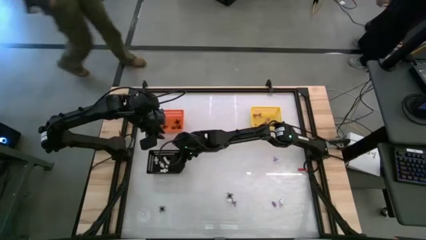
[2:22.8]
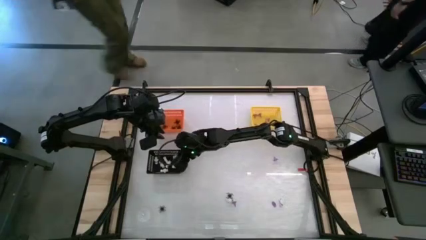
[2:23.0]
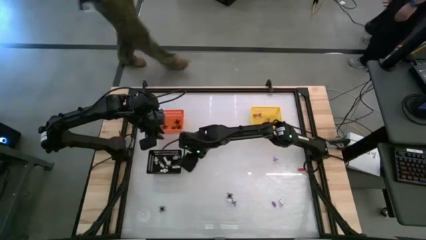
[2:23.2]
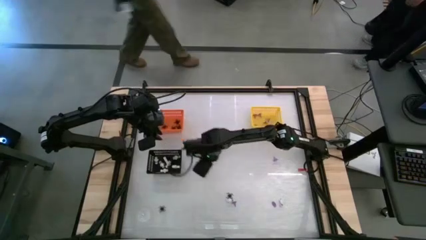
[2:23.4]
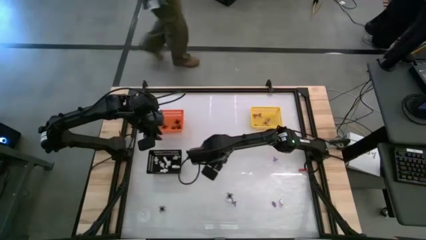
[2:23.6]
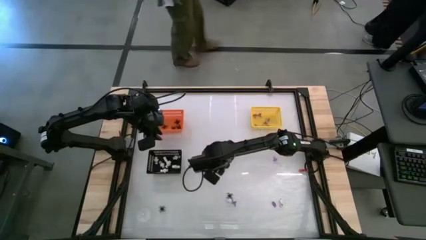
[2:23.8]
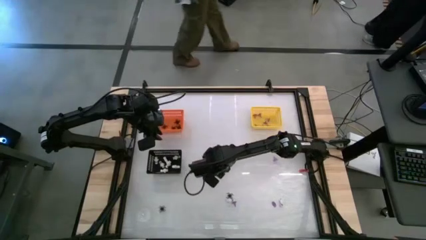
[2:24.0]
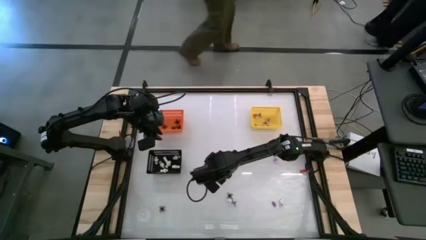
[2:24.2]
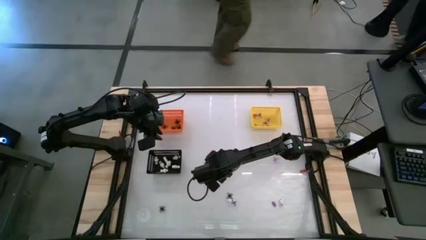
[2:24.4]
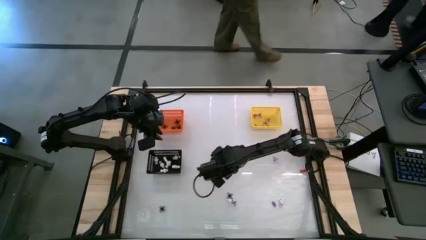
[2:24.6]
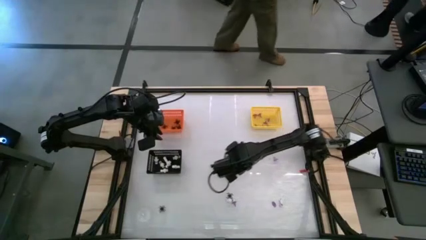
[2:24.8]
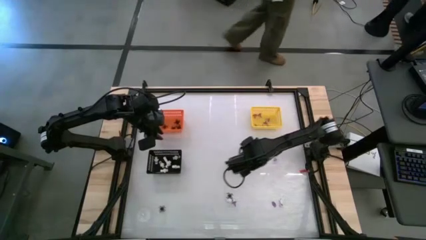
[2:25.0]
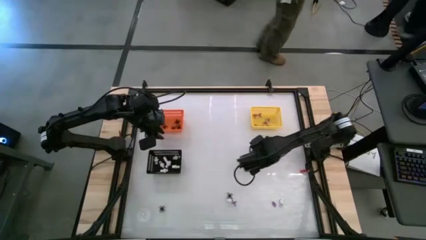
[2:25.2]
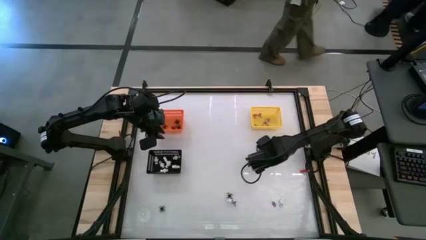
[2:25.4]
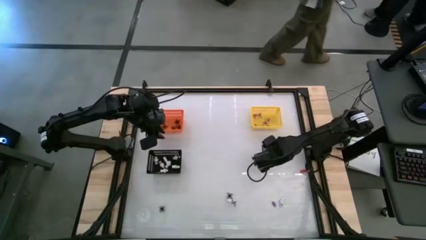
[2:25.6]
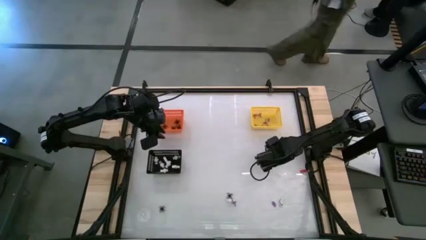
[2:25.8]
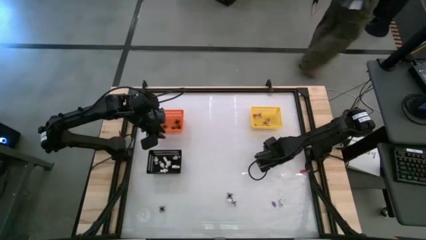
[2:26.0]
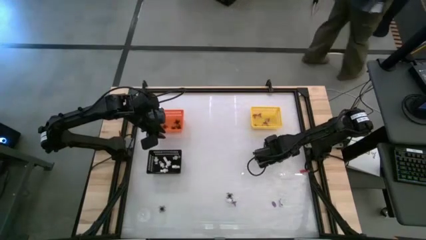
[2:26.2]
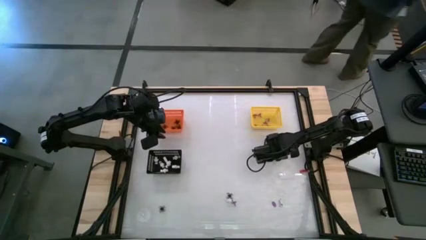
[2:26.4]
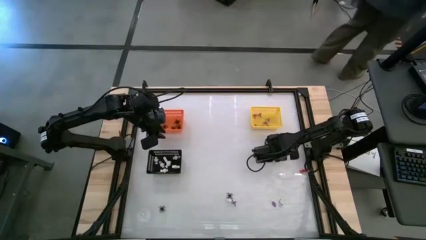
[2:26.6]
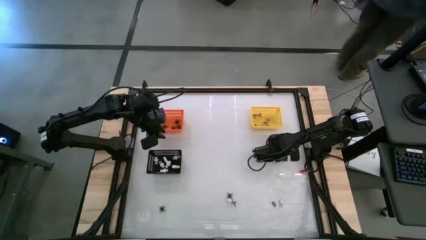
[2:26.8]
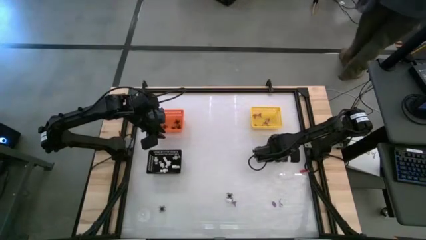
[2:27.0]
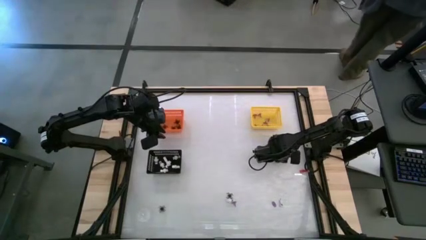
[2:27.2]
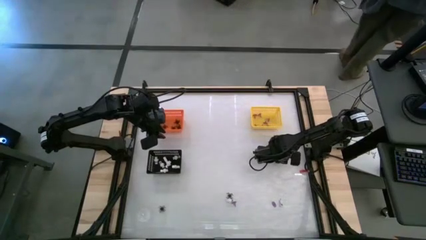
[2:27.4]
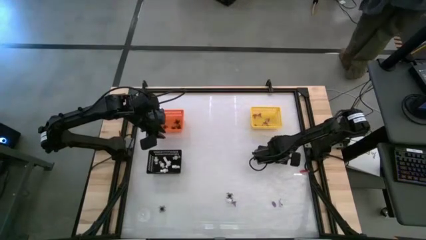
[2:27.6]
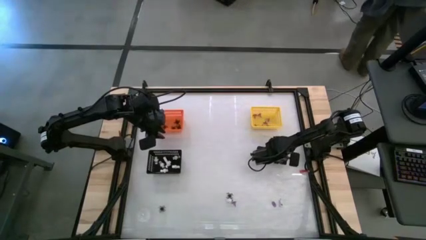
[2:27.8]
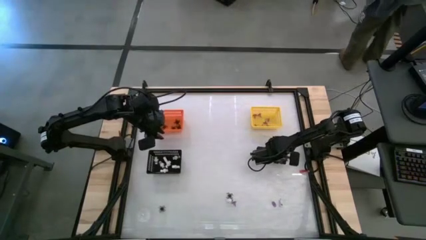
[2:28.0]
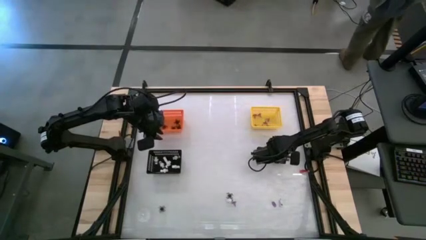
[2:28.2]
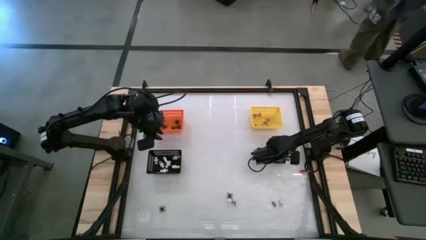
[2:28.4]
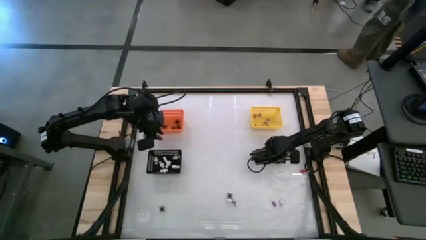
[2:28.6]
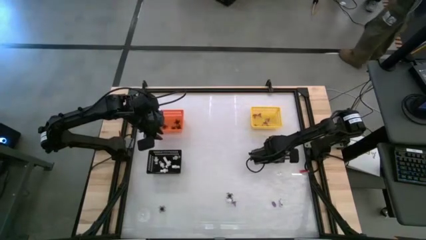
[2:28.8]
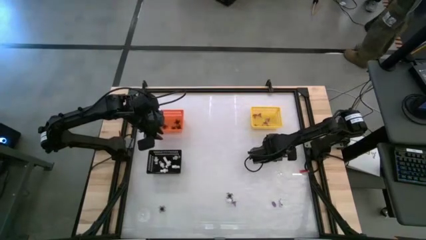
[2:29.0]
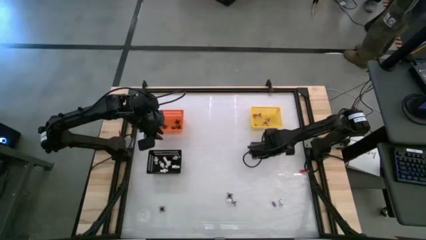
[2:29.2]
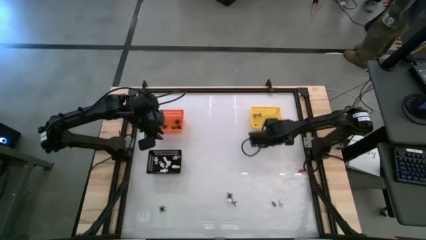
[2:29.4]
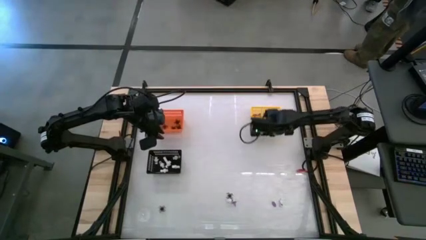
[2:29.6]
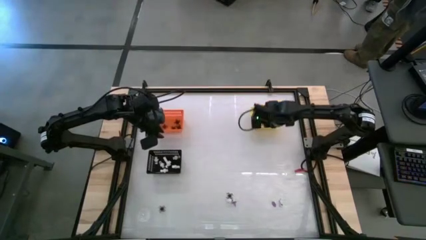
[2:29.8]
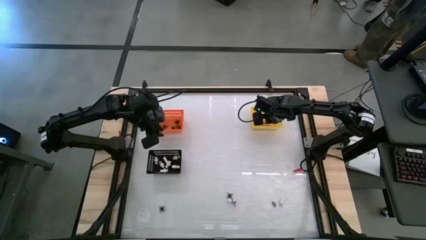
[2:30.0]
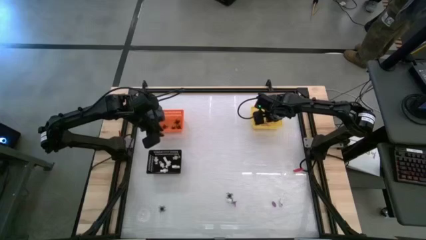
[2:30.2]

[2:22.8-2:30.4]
Task: Sort Halloween decoration
Put the violet witch hat into the yellow bin

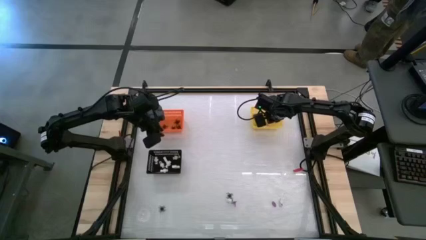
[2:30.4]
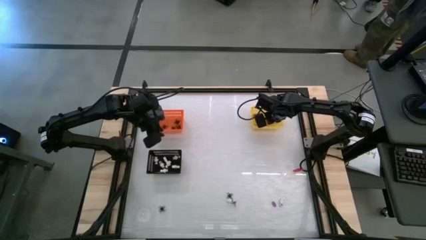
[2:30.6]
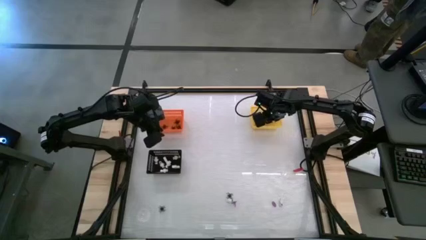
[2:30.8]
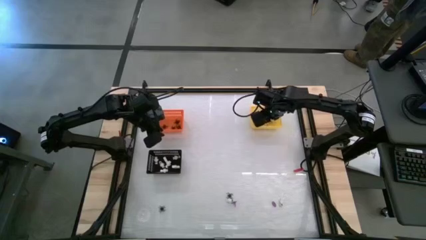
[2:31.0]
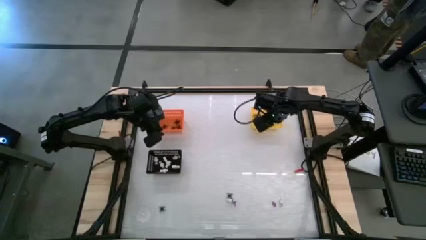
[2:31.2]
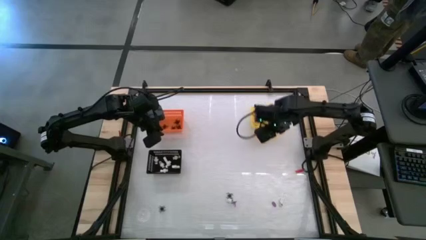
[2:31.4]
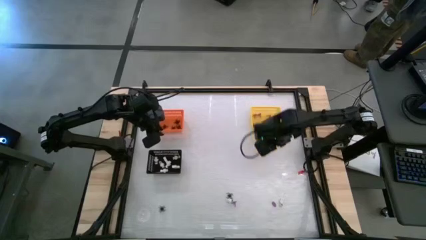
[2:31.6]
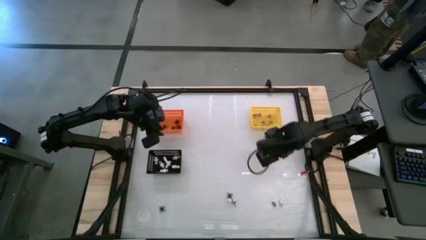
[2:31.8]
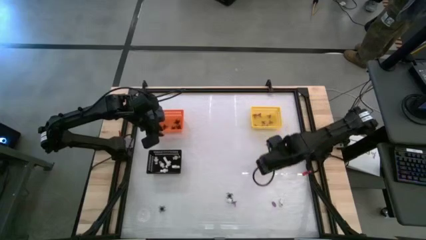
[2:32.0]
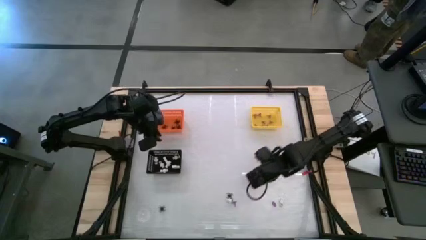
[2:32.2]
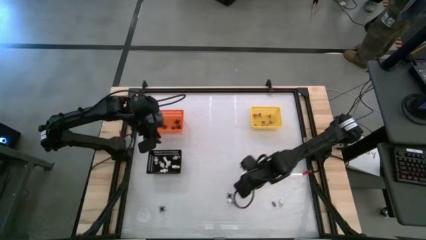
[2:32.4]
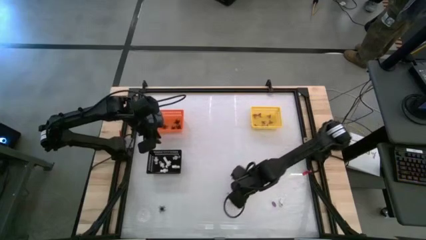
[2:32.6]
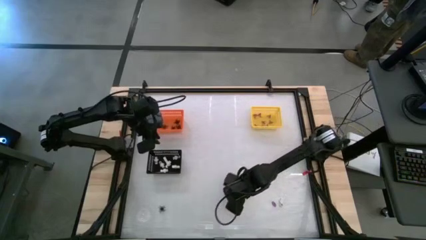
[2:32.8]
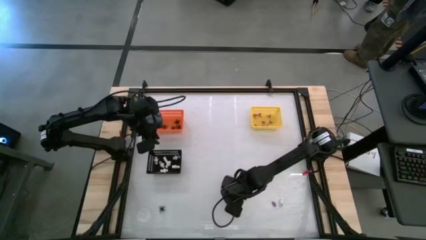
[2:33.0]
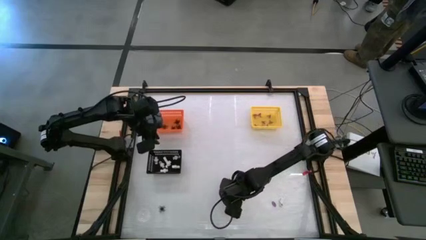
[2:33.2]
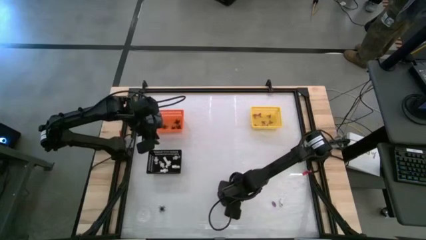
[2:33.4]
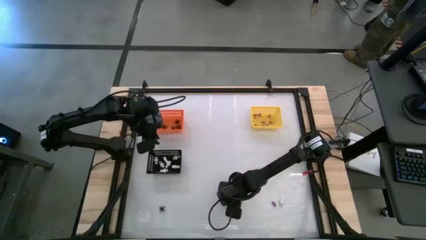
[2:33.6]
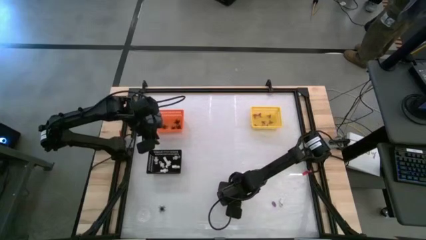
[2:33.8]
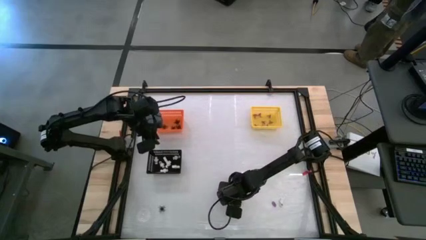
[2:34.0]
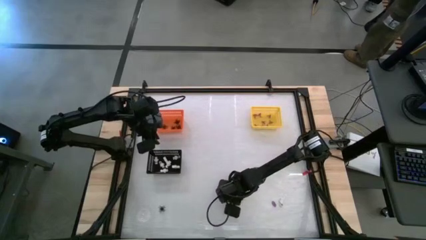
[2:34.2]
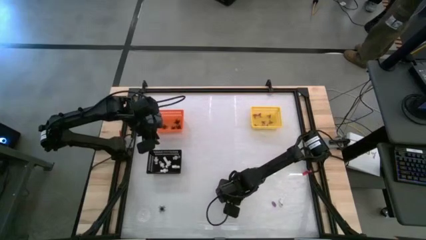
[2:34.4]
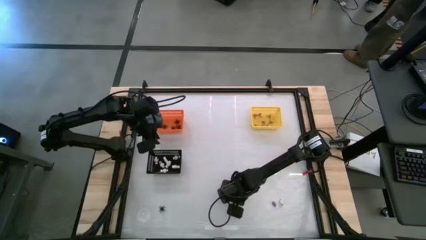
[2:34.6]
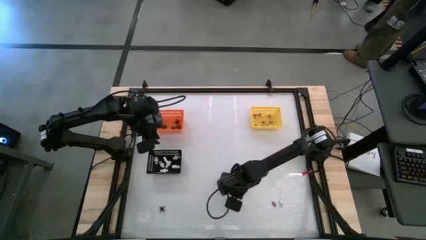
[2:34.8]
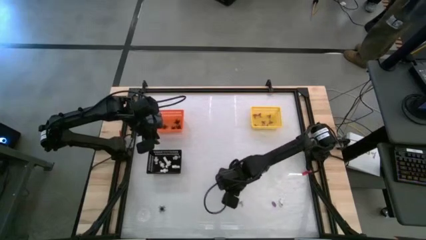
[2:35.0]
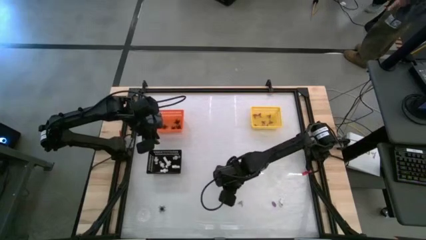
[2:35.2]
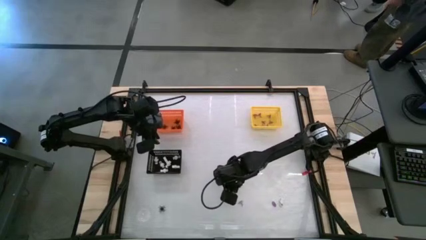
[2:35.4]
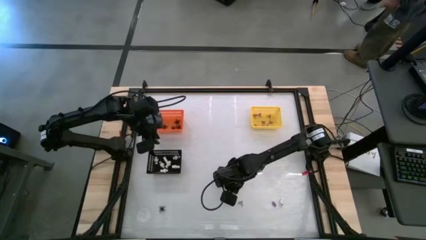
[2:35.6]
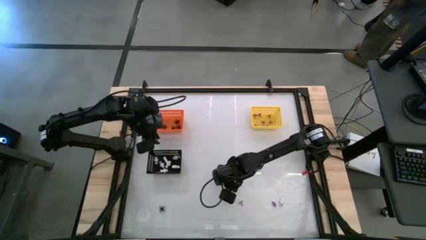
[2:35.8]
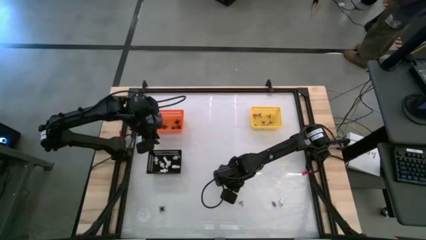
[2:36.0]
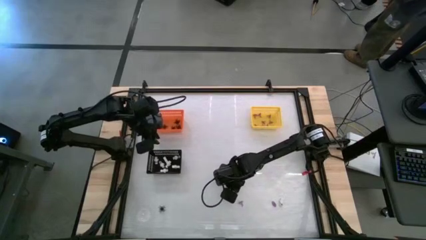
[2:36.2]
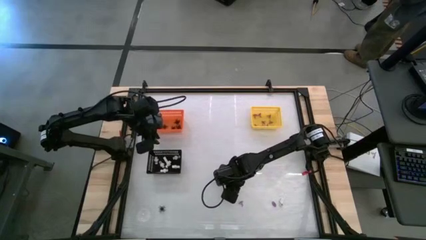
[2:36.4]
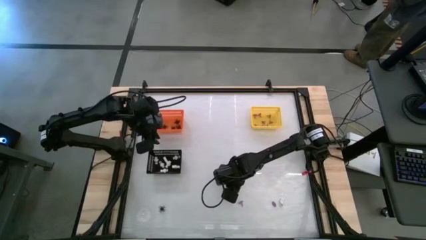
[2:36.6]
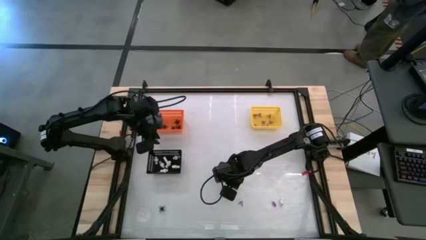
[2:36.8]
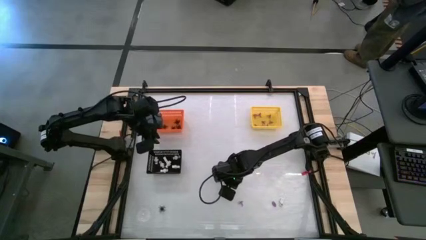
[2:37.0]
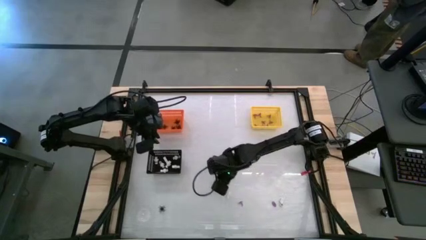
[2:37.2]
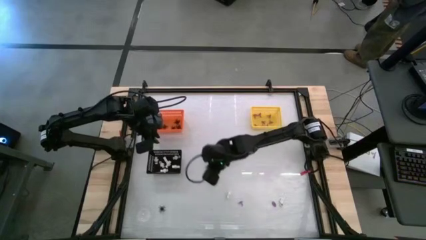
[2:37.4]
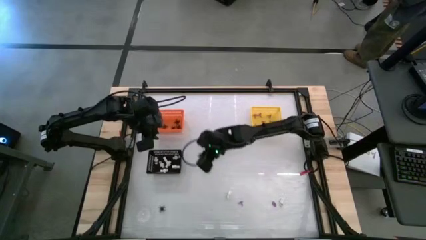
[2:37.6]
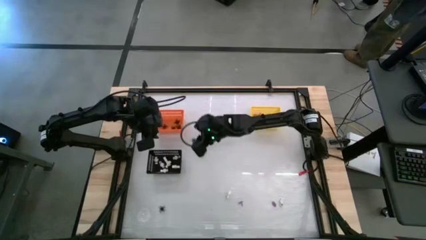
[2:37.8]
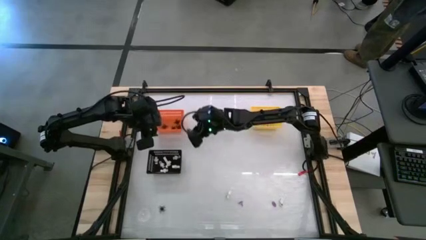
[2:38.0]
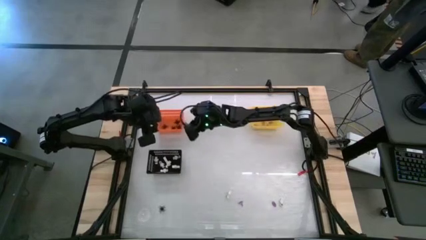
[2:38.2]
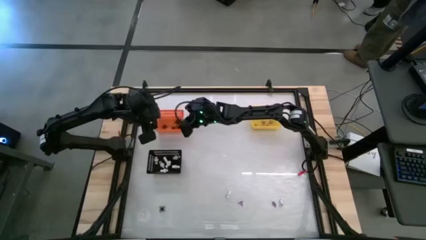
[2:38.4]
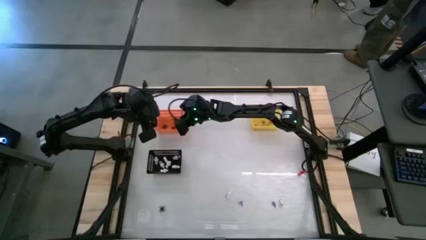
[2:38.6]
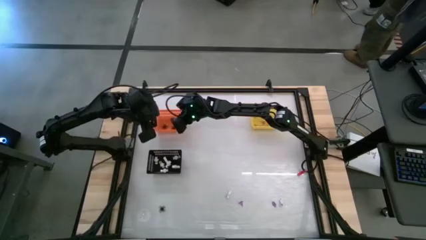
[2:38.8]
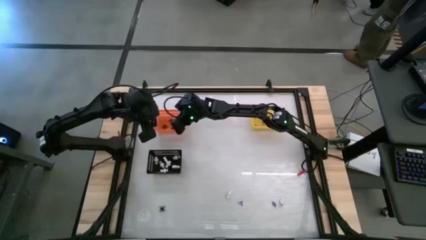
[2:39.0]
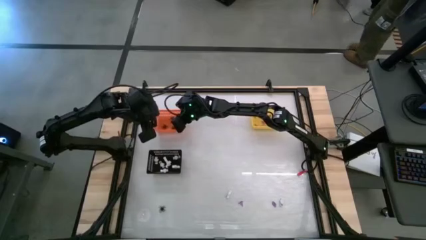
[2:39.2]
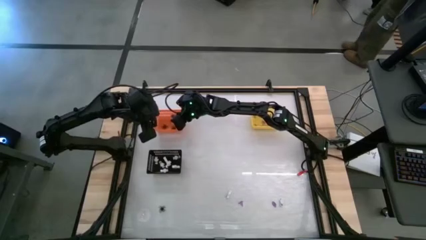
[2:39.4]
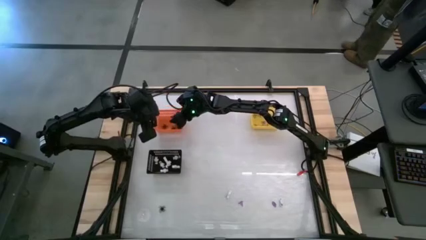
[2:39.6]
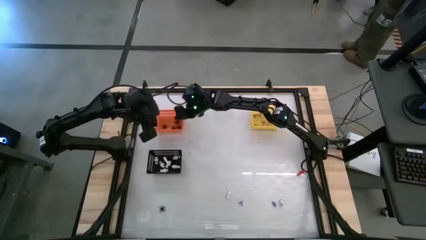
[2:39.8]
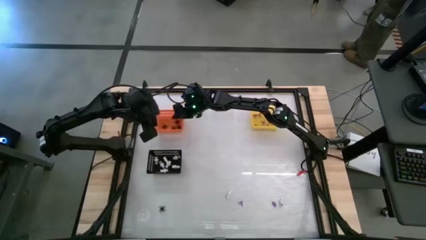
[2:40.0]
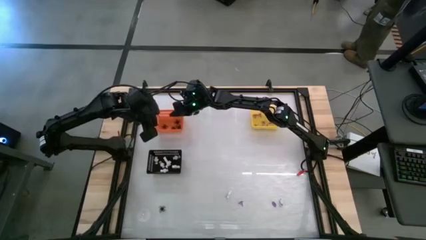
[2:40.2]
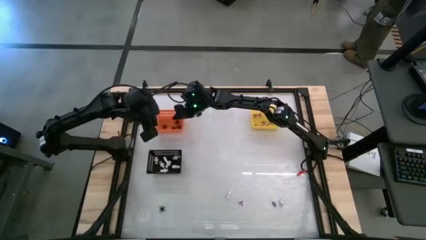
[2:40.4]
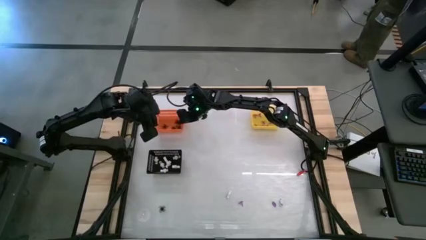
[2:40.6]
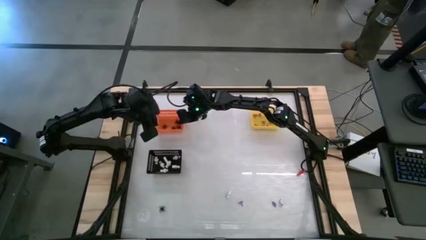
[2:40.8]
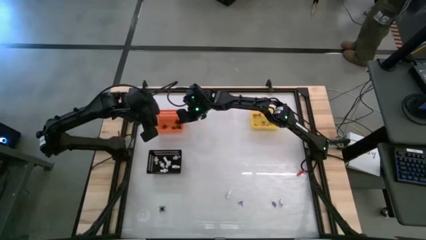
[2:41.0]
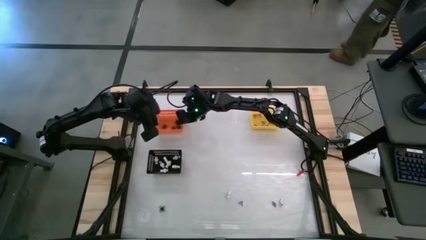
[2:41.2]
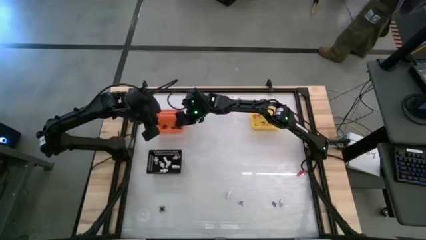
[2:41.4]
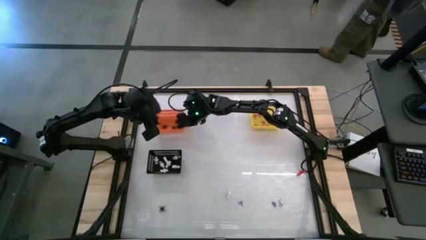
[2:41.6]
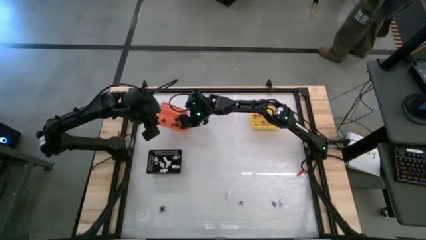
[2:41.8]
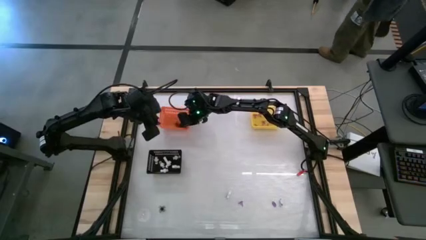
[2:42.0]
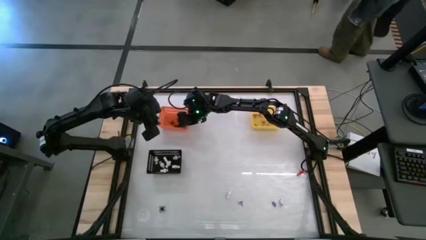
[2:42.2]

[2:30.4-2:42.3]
Put the black spider toy into the orange bin
